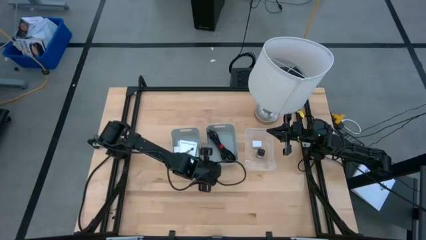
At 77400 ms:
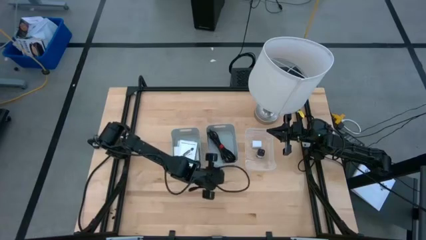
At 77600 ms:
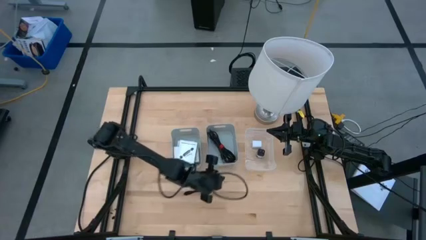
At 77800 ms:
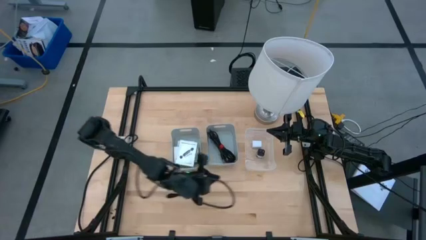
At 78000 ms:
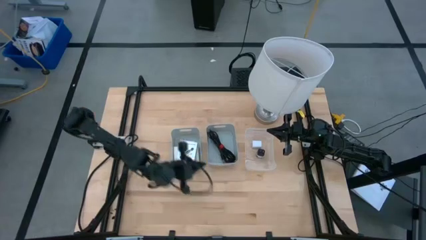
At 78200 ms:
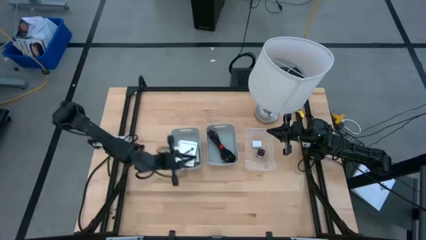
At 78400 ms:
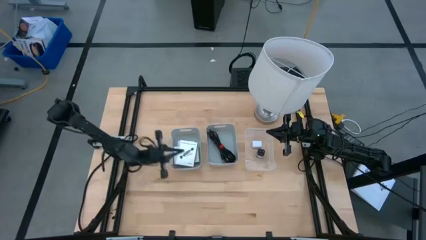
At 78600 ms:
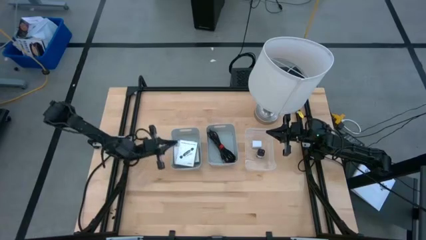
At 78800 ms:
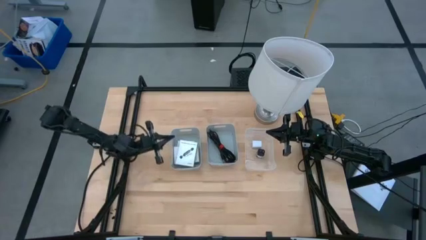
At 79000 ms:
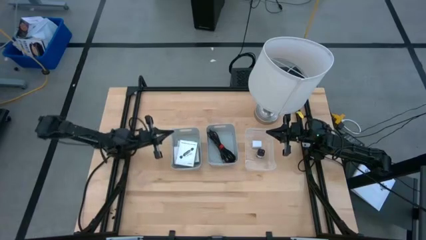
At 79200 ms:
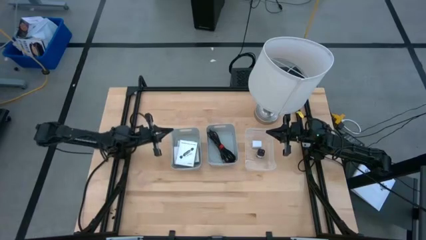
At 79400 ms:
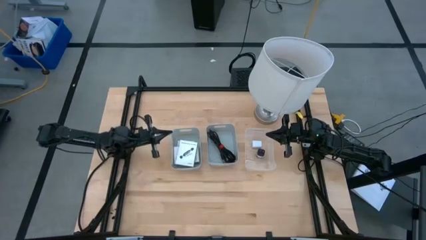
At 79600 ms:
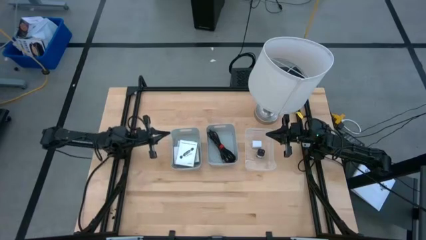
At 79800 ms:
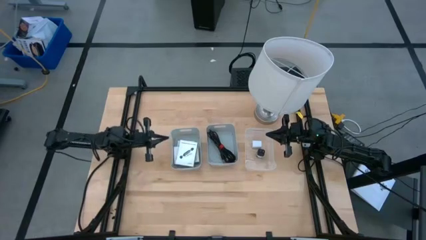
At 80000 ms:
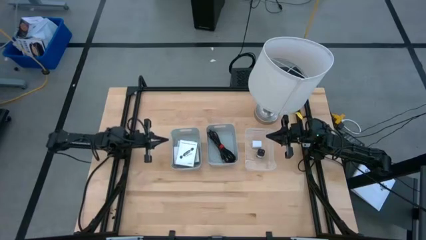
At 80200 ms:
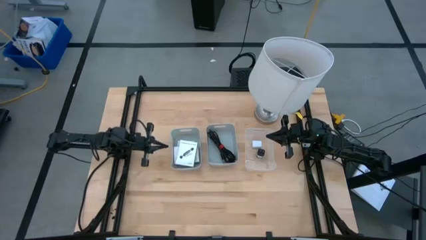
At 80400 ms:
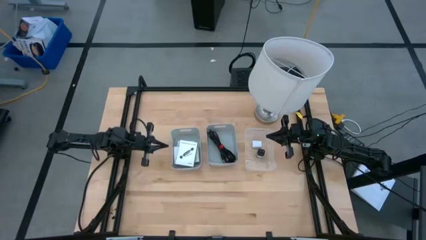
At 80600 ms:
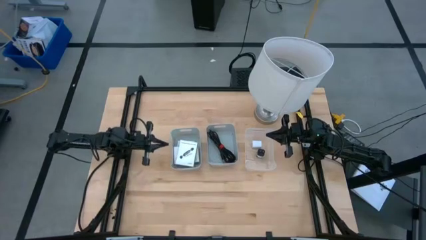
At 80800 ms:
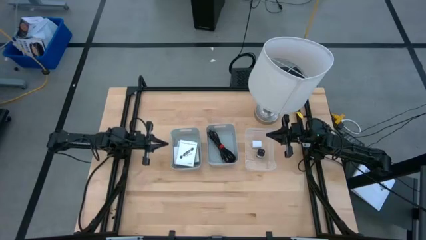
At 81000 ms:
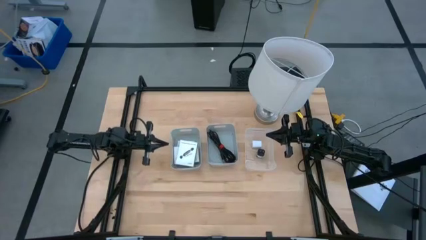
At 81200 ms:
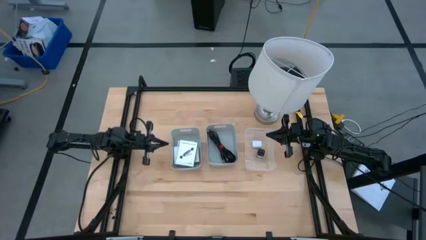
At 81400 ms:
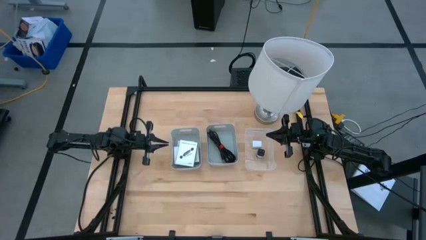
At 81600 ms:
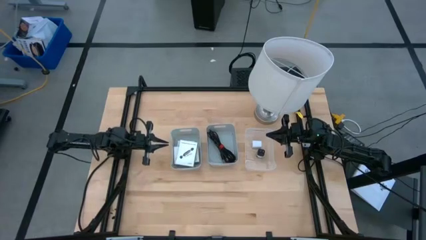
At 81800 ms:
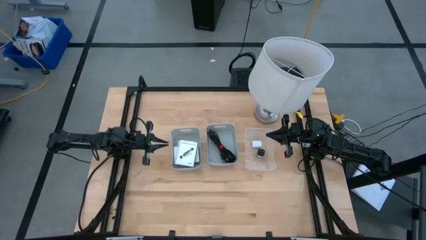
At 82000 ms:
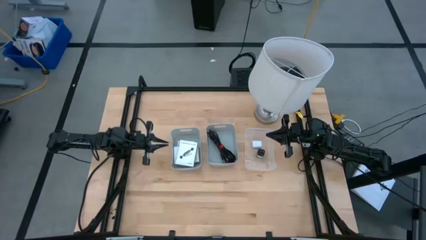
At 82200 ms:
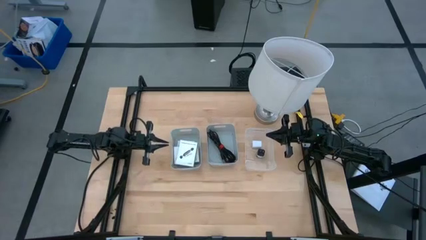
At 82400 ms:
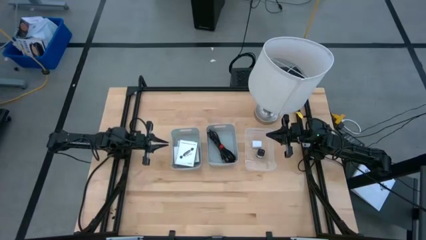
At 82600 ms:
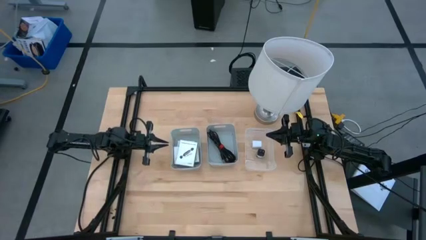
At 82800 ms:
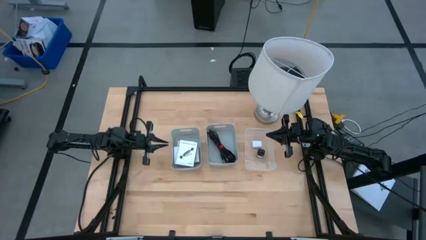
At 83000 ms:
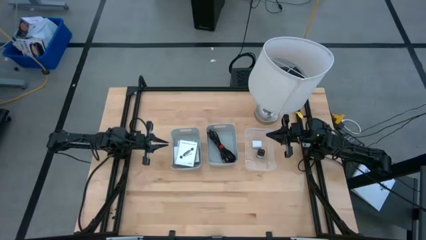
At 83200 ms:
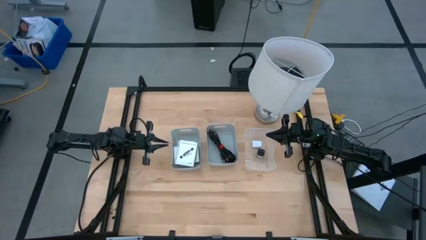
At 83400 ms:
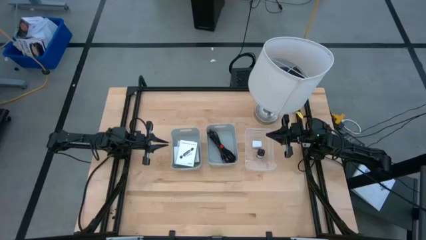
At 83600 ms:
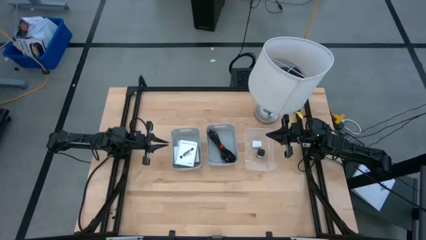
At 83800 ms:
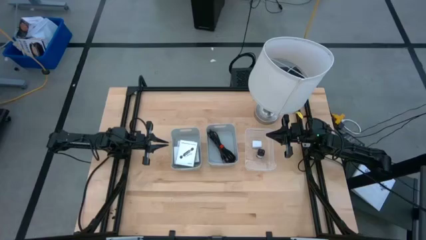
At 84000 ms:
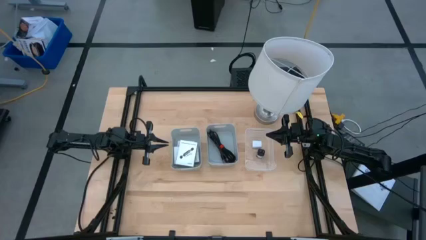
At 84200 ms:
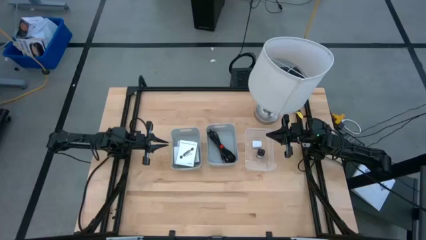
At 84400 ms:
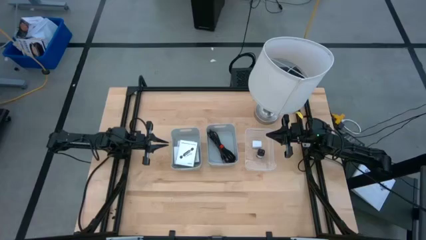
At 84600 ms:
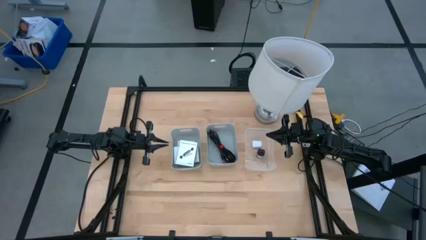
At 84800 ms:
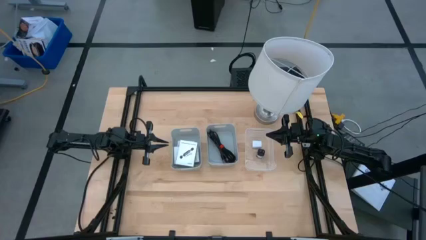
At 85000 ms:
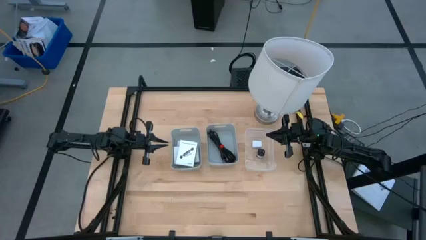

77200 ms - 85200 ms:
Task: Pick and place items into bin
Return to Home Position

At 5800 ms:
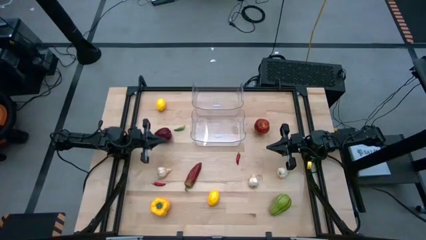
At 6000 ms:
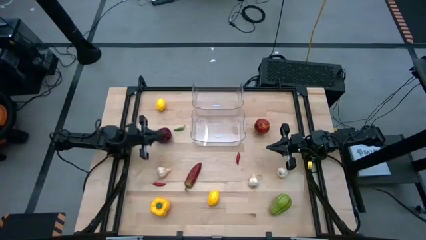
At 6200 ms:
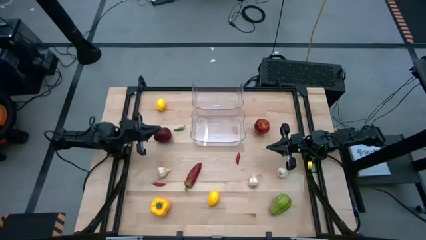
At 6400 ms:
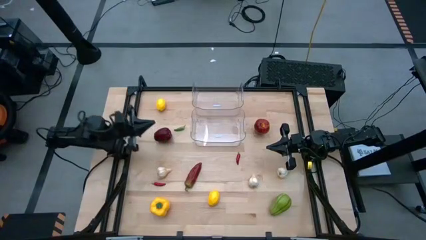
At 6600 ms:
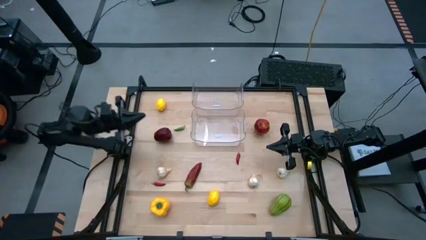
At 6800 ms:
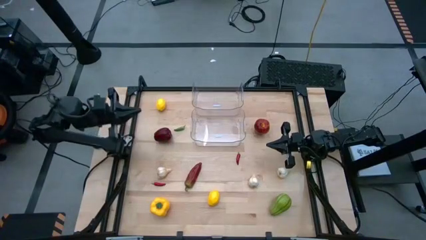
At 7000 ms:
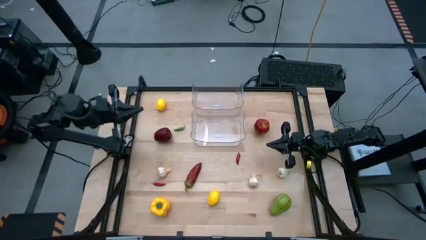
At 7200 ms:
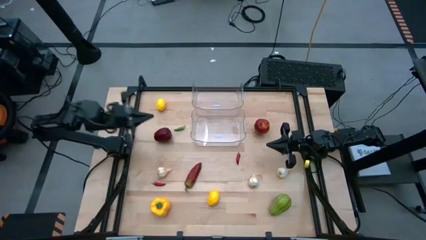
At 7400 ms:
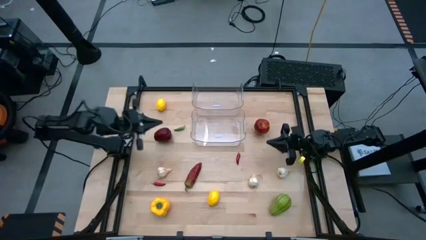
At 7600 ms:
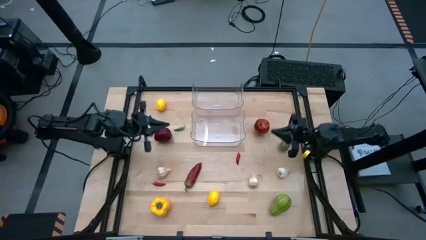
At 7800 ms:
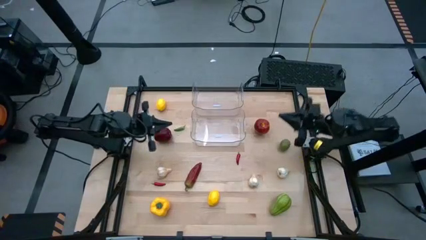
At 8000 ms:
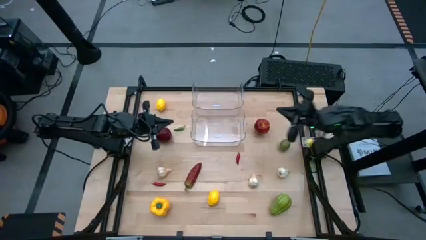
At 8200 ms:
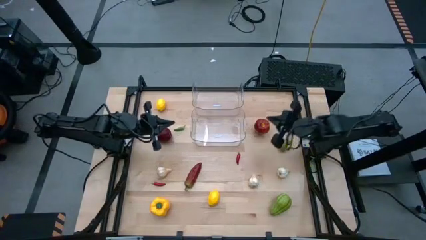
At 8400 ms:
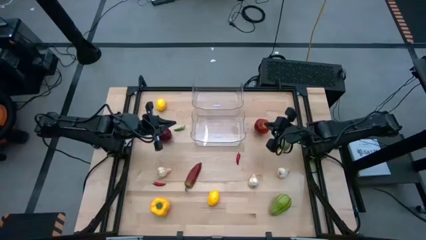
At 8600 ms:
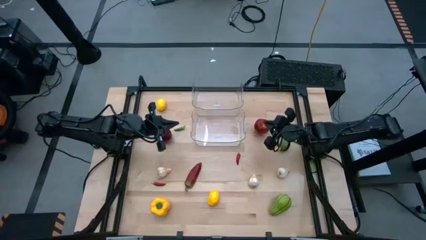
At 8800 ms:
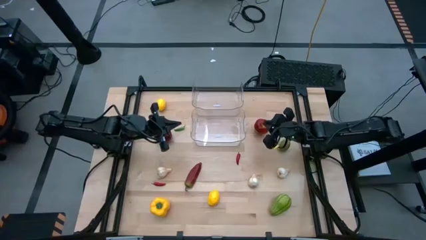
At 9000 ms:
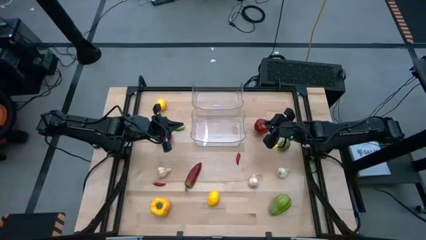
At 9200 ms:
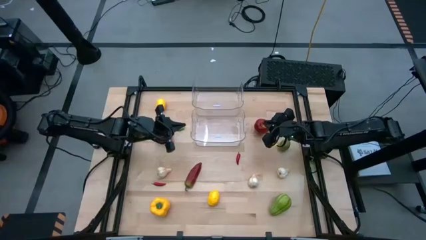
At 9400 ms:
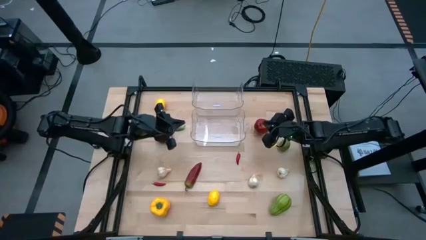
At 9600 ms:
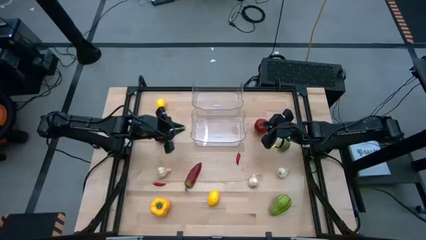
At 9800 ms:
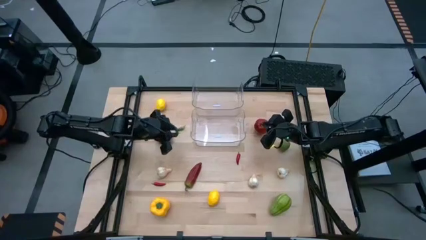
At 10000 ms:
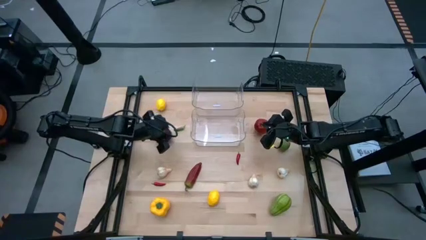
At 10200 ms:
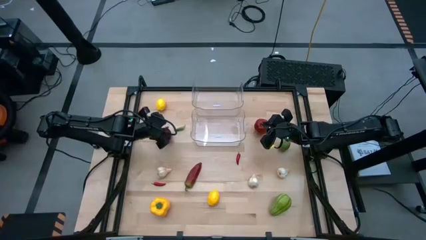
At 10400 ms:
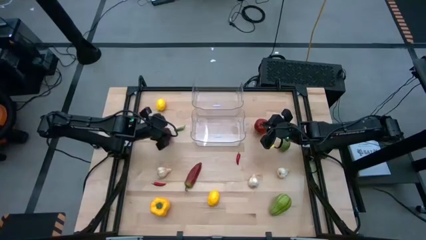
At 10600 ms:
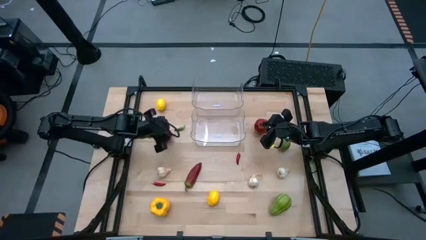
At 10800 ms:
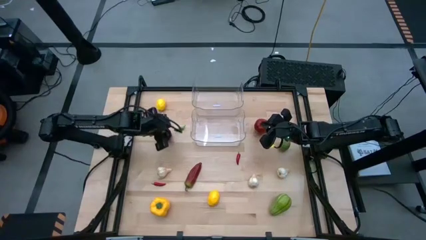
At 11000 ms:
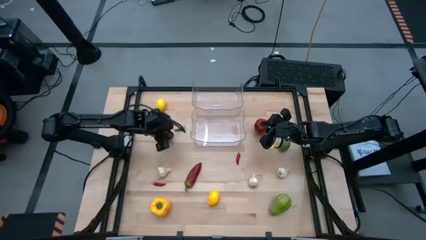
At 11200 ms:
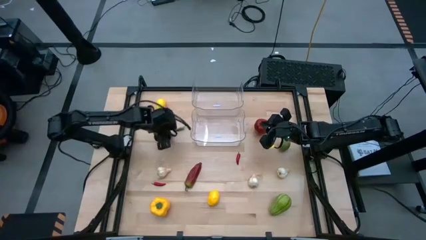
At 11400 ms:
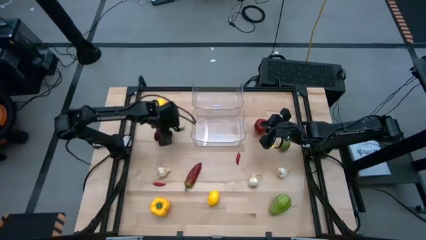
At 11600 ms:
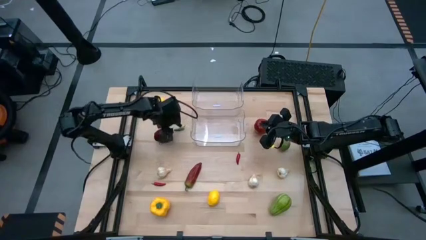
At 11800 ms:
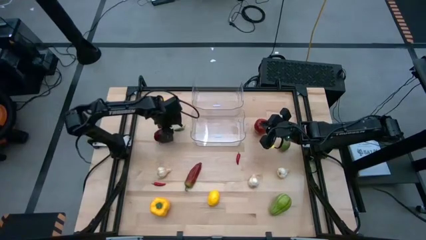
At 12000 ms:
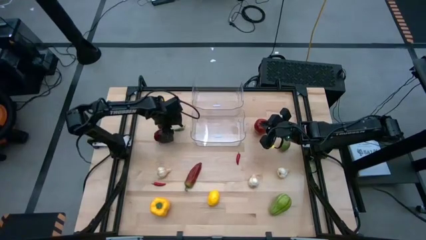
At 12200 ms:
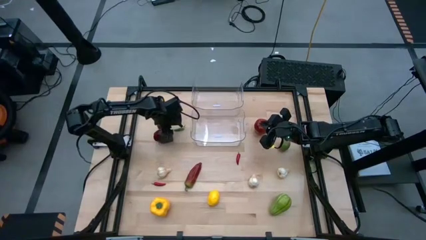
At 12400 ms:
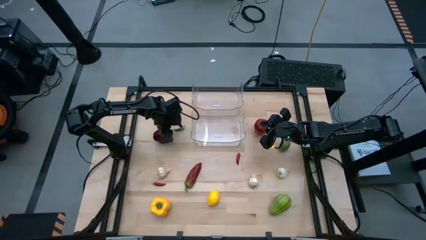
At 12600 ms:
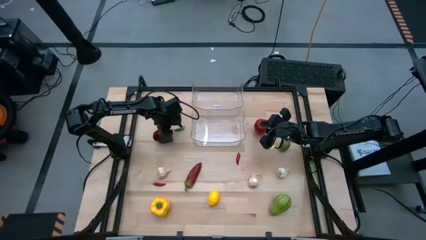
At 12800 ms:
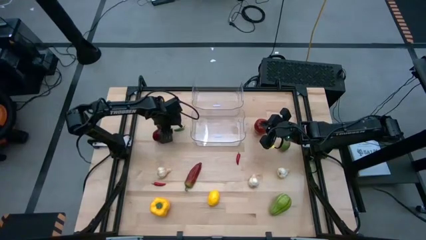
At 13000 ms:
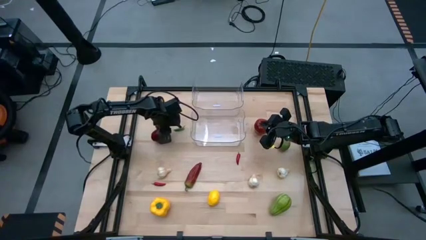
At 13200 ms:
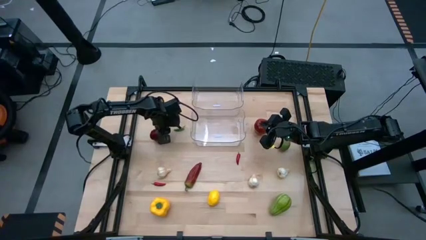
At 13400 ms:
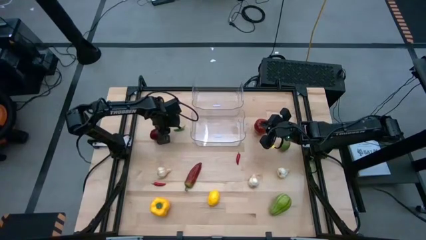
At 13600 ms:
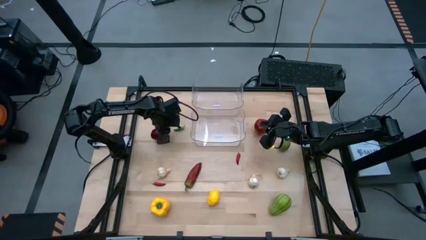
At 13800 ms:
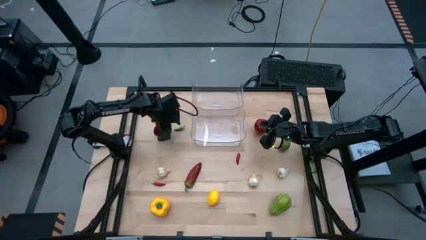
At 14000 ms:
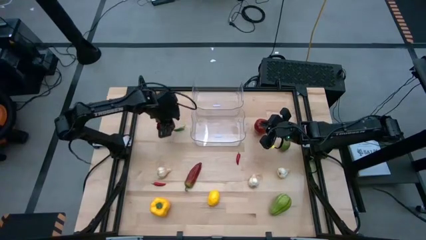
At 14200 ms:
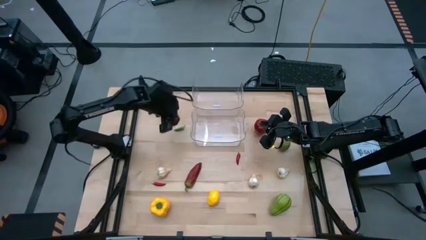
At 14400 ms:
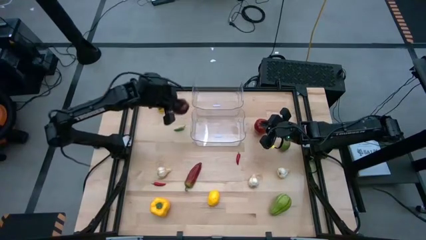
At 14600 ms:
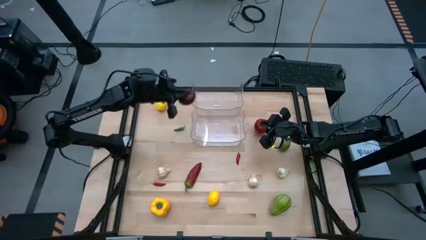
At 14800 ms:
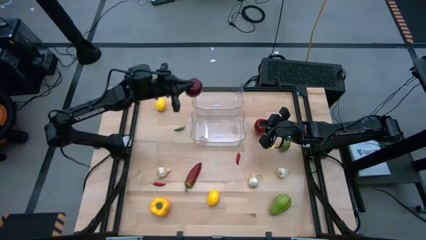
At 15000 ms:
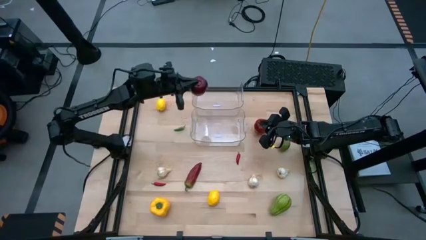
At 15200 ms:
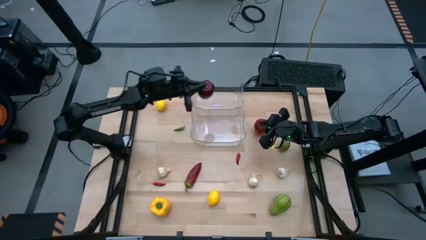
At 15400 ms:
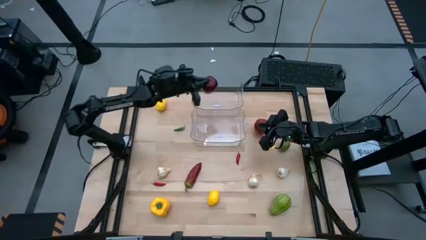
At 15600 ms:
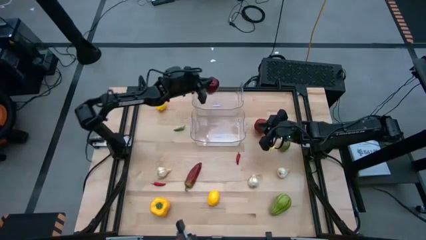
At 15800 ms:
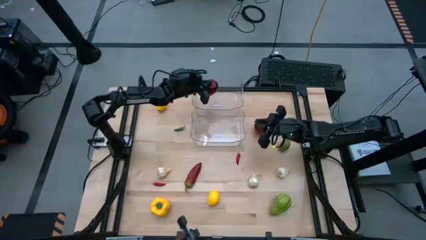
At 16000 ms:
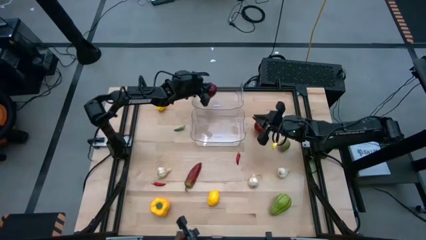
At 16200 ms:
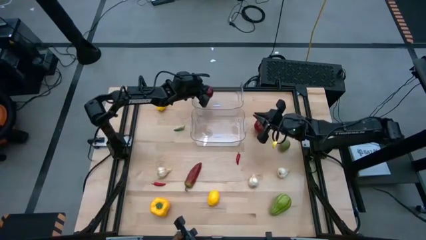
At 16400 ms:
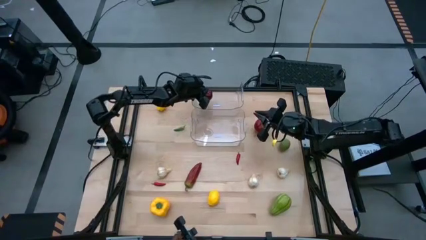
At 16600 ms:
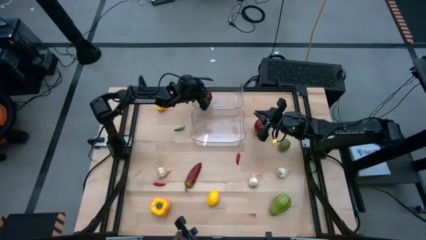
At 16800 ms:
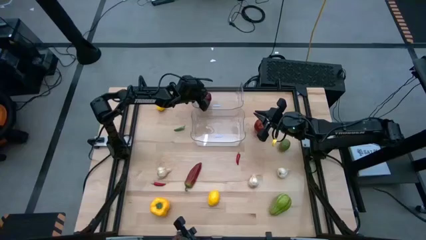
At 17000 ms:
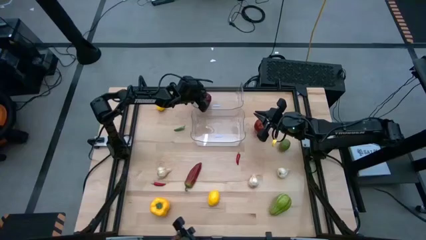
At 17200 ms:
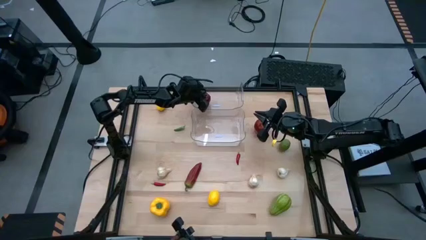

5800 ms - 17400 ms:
Task: Sort produce into baskets
Put the left red apple into the top transparent bin
